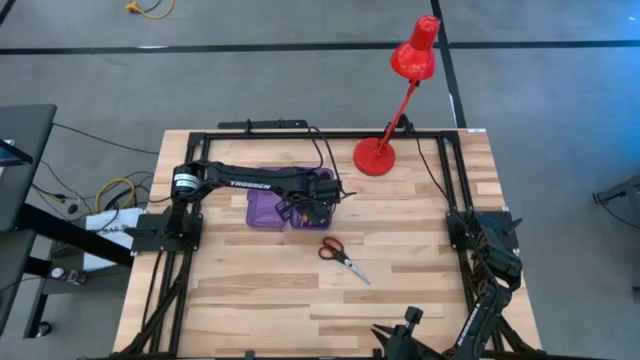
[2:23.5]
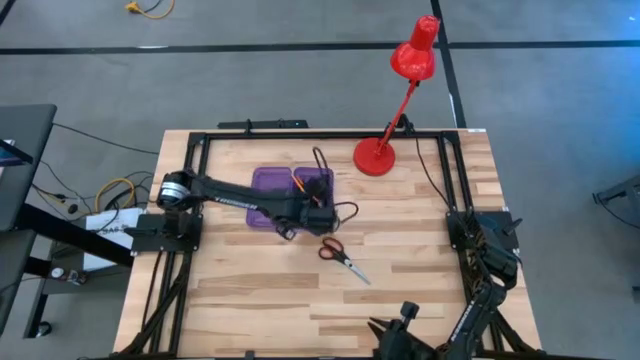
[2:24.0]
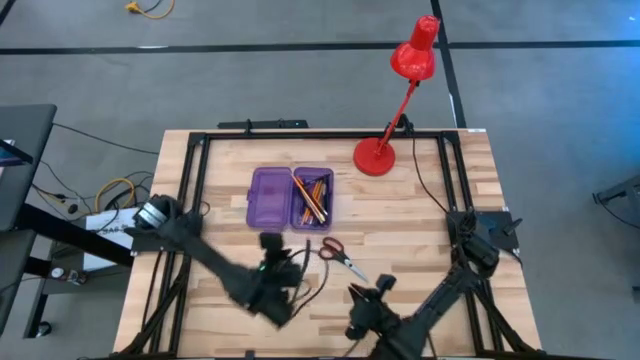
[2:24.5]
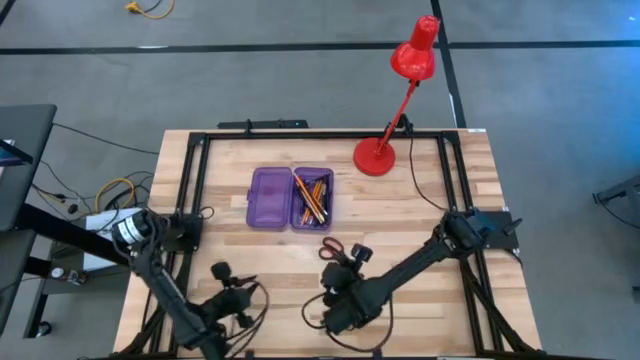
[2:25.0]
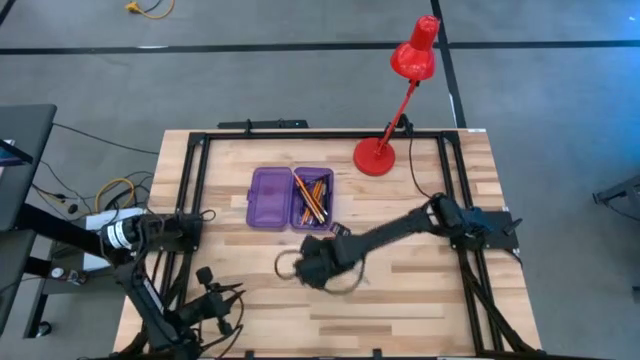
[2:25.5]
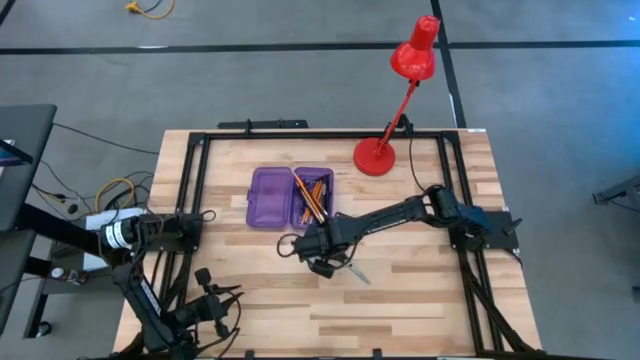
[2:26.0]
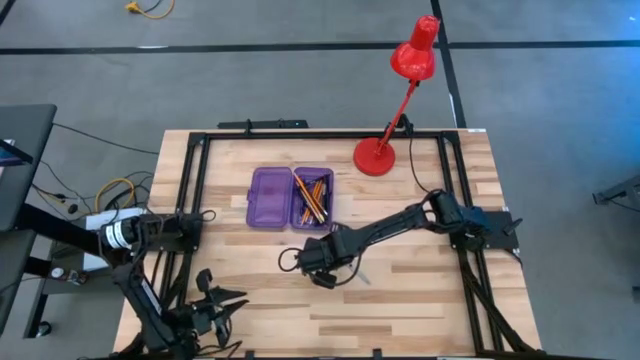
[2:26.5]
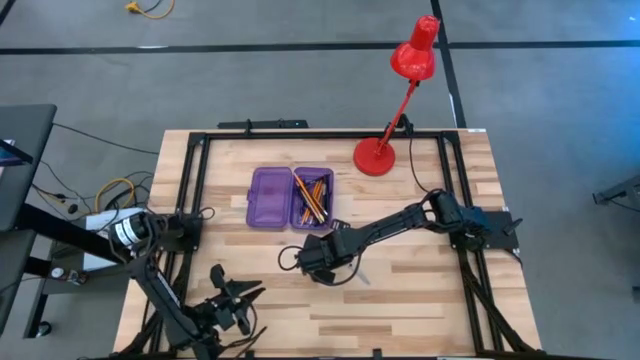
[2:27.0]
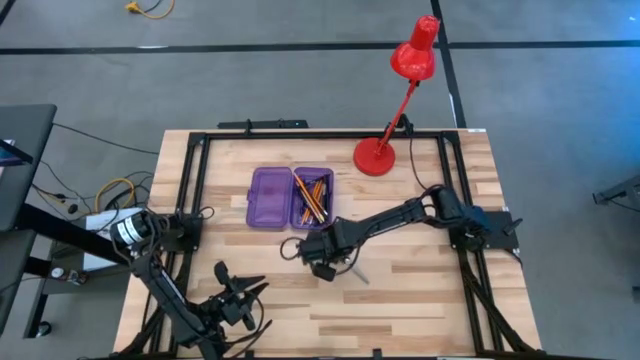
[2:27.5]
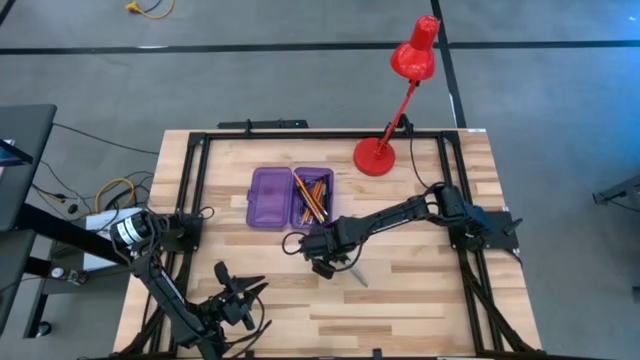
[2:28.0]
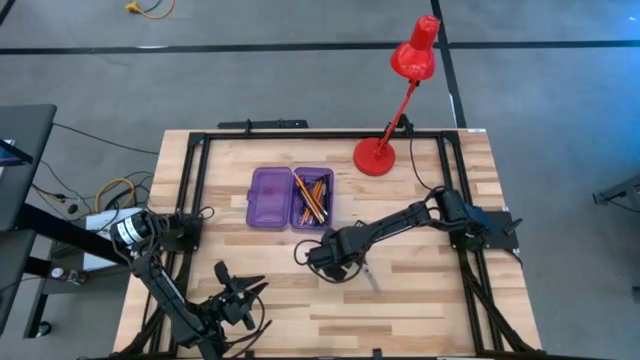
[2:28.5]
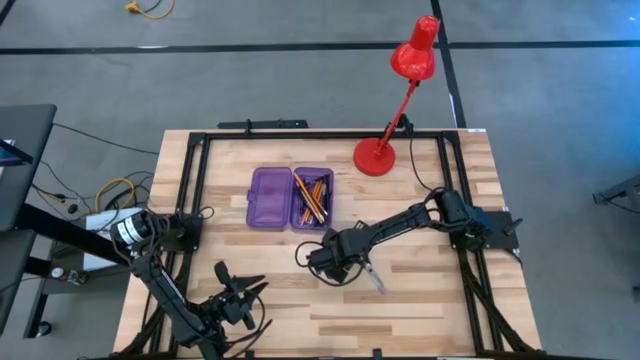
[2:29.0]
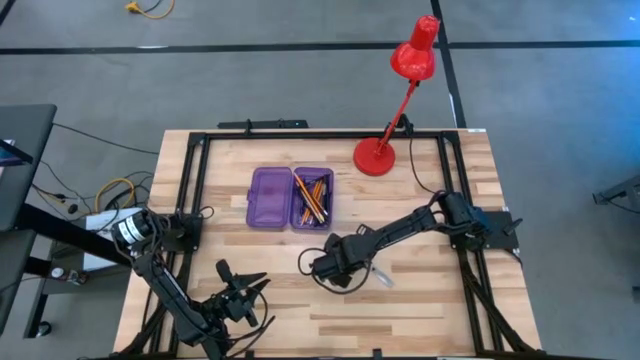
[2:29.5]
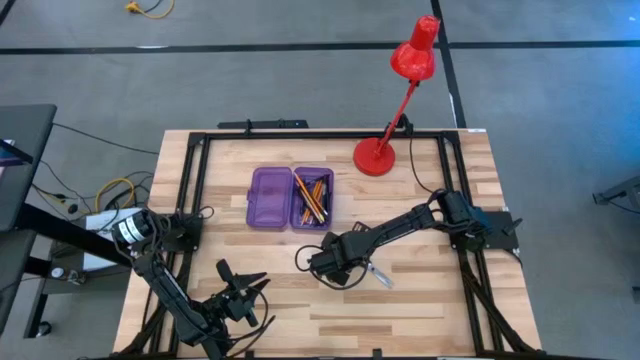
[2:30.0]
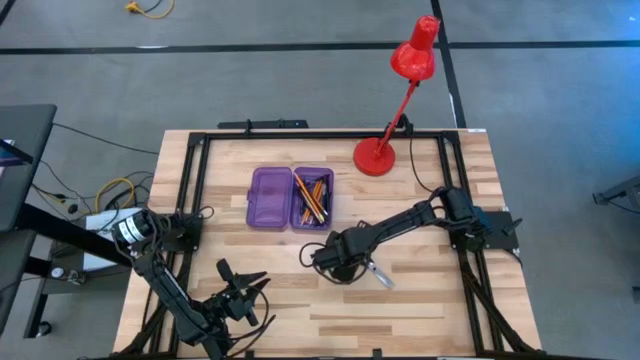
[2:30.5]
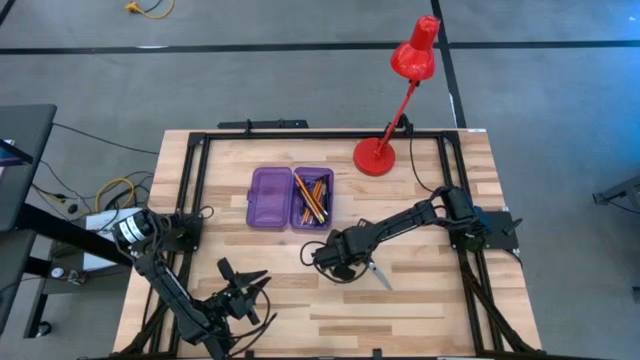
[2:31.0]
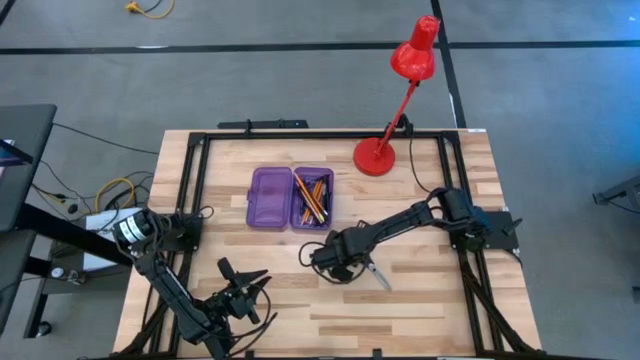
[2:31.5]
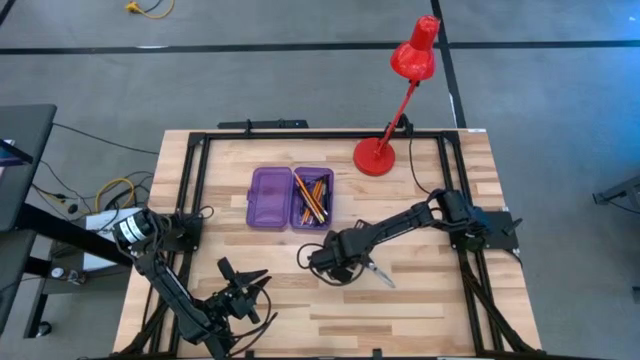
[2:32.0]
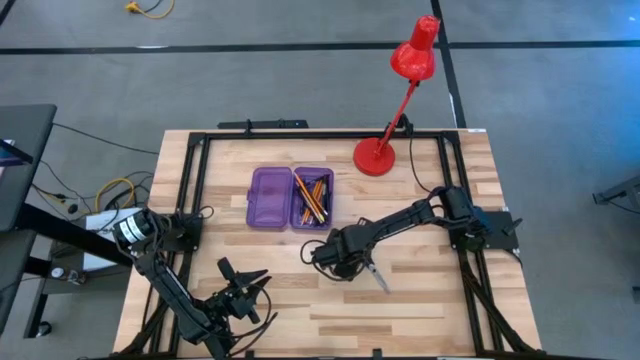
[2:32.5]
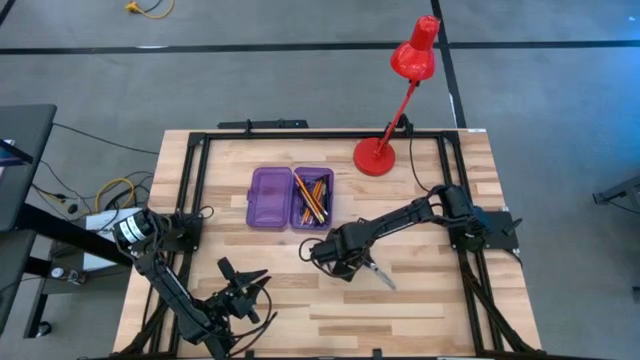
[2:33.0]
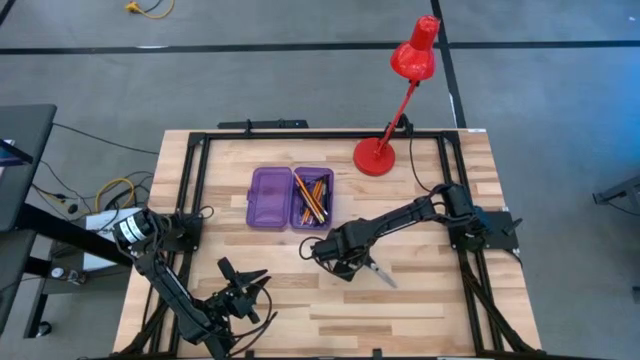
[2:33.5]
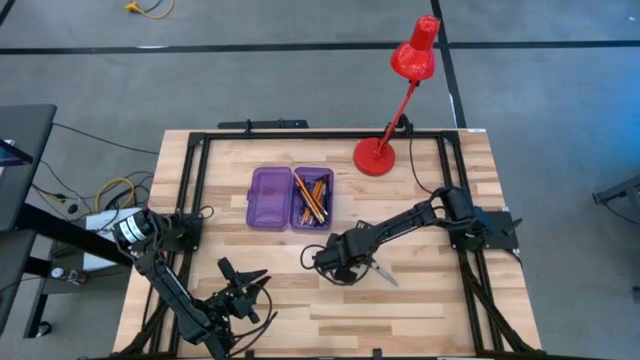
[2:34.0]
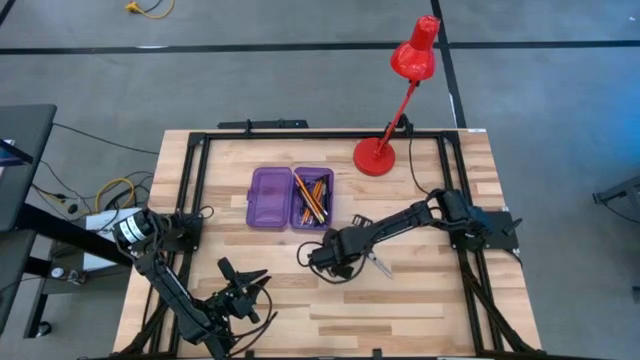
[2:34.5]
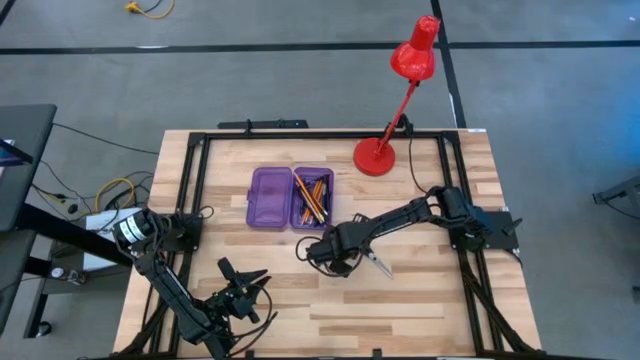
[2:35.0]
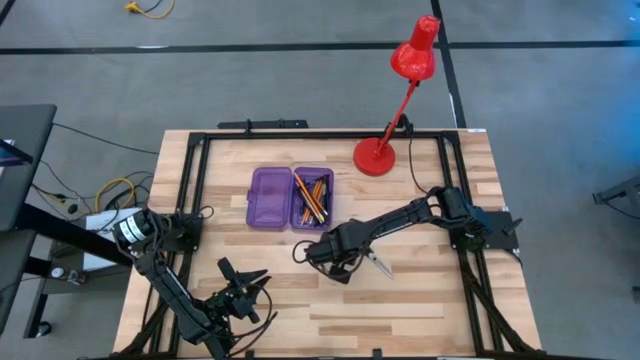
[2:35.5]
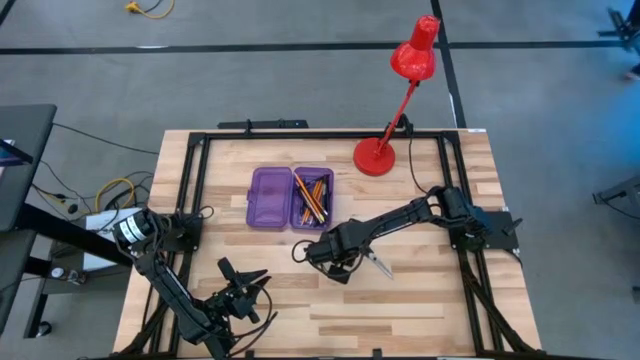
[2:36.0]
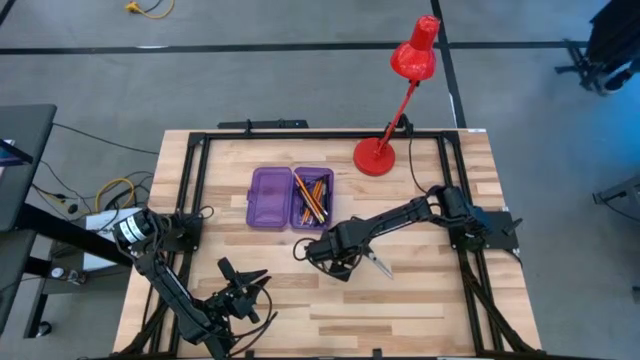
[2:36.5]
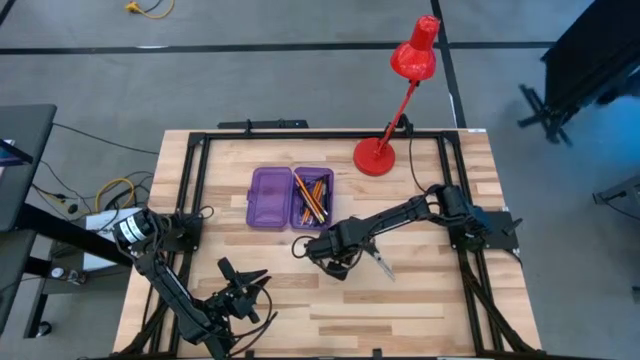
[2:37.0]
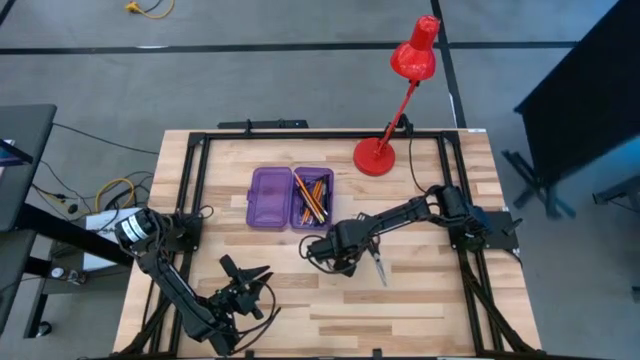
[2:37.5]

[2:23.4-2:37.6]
Task: Pick & place school supplies into a supply box
Put the black scissors into the violet supply box

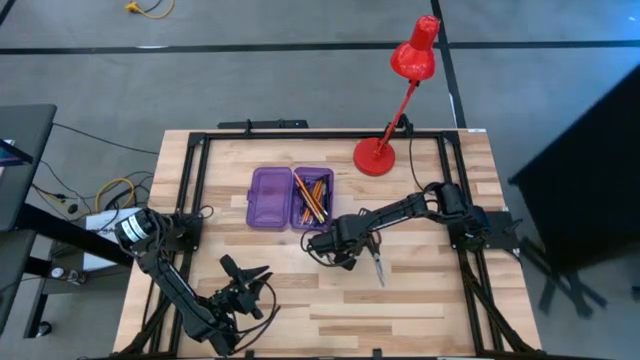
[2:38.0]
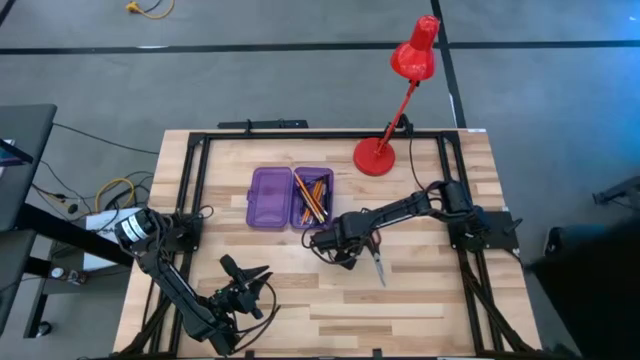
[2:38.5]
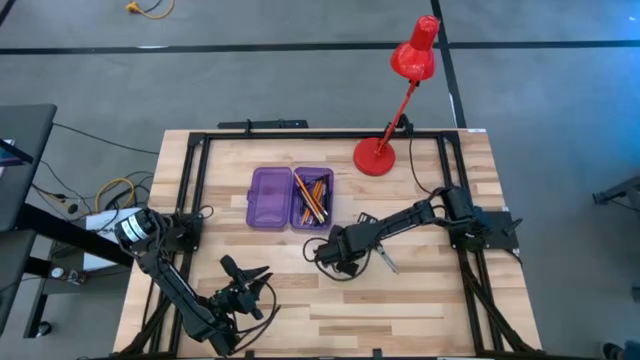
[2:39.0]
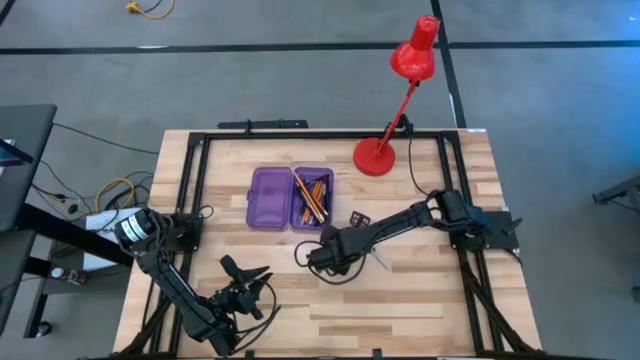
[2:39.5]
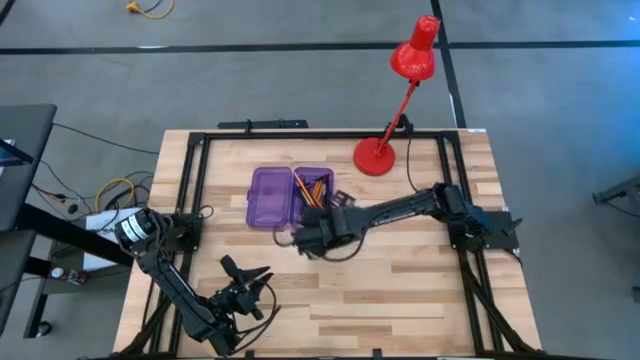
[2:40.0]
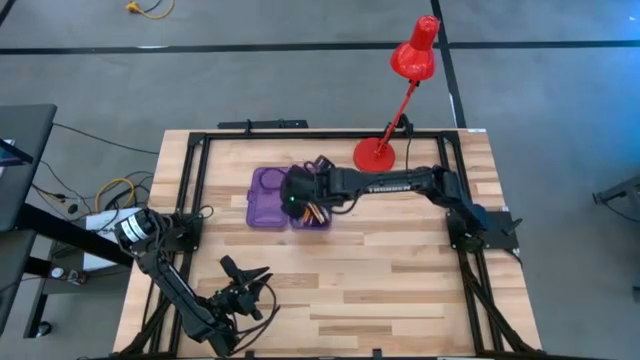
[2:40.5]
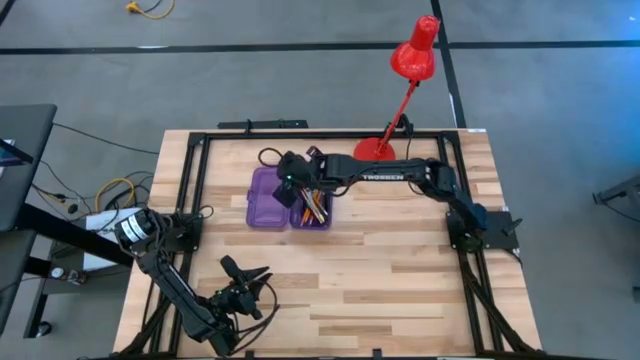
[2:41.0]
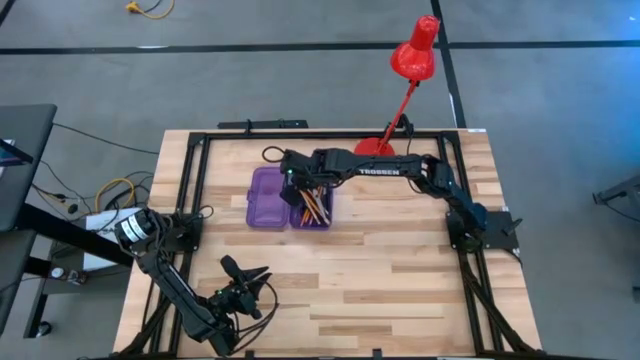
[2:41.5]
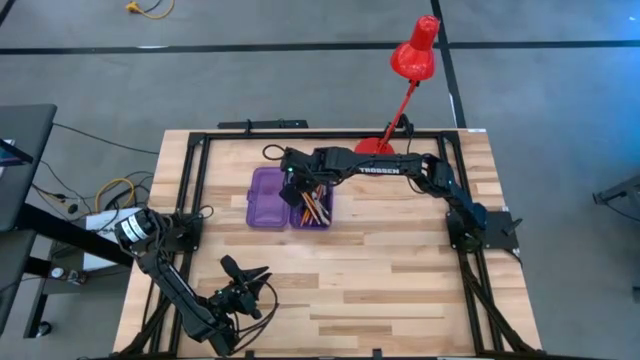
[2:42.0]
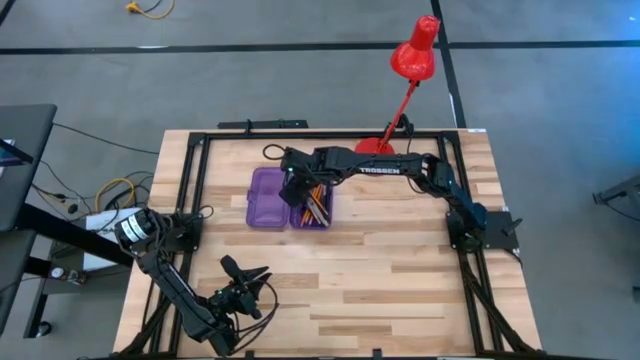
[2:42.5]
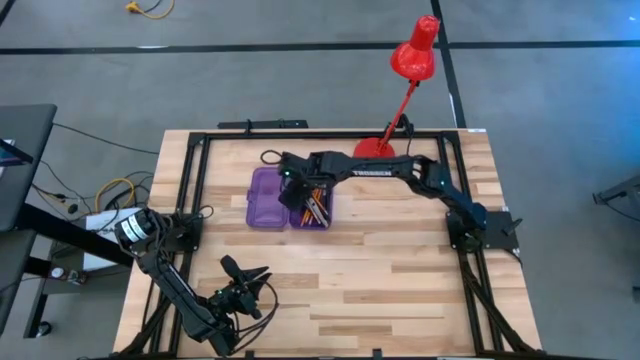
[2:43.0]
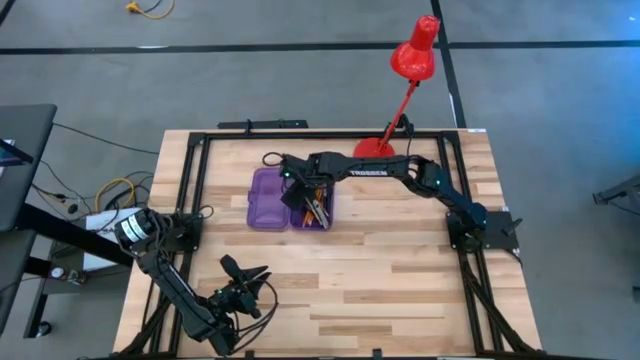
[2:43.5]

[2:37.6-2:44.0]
Put the black scissors into the violet supply box
